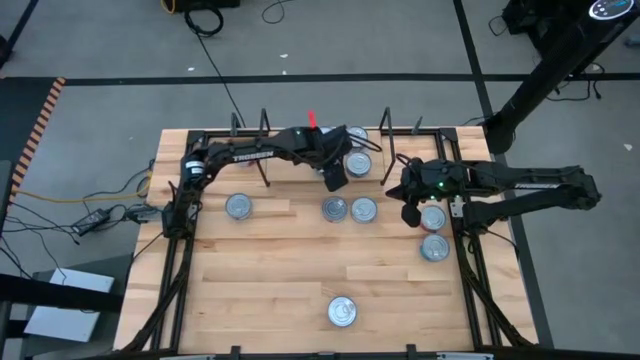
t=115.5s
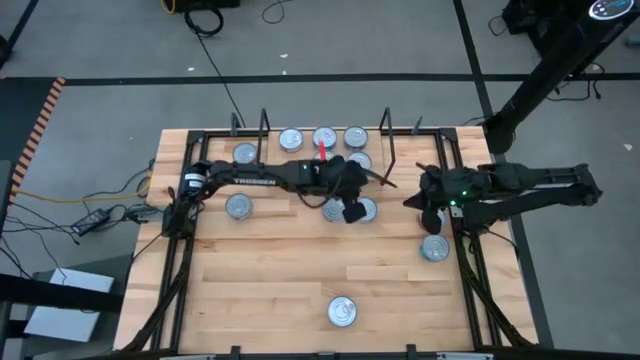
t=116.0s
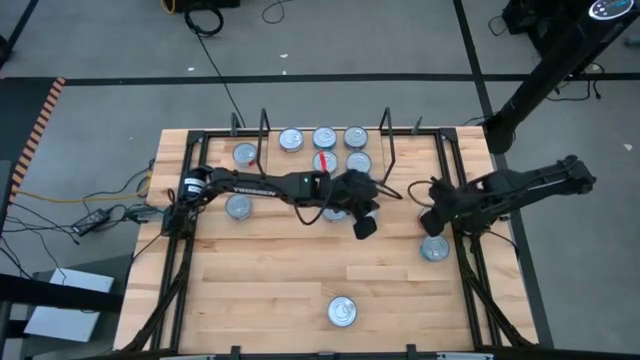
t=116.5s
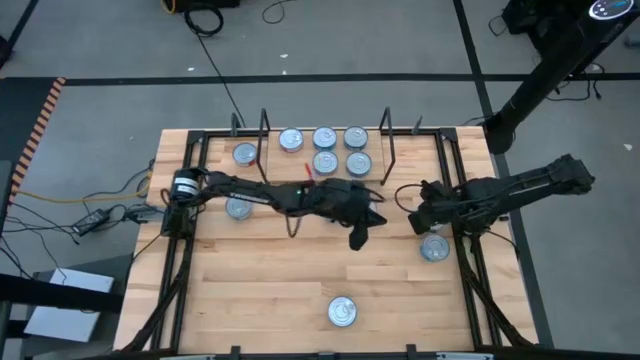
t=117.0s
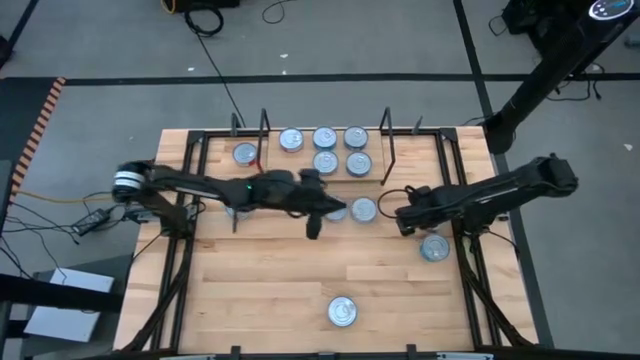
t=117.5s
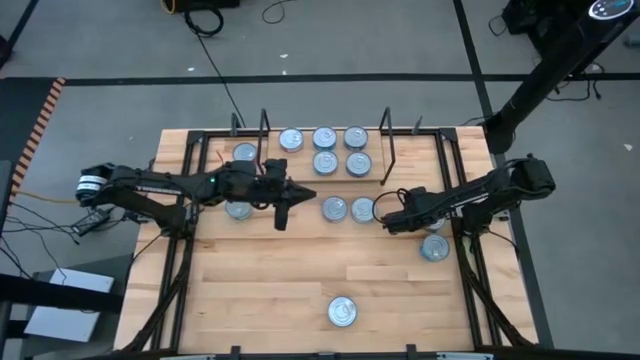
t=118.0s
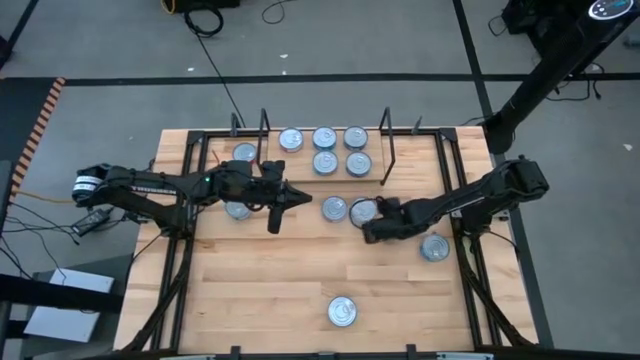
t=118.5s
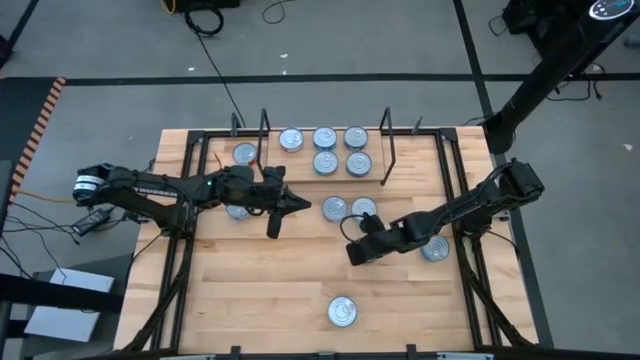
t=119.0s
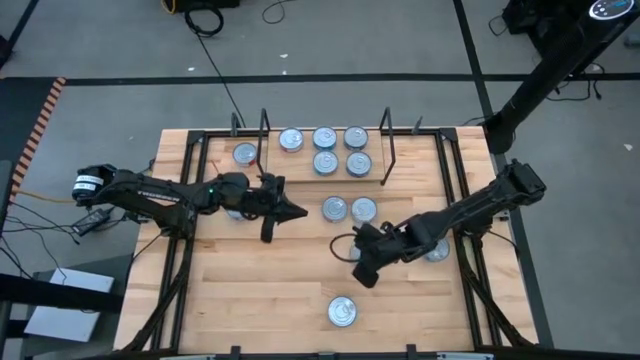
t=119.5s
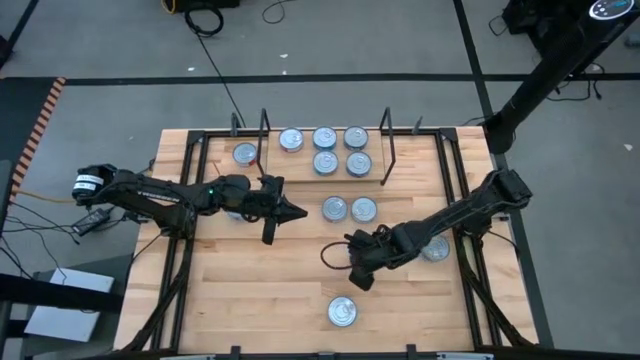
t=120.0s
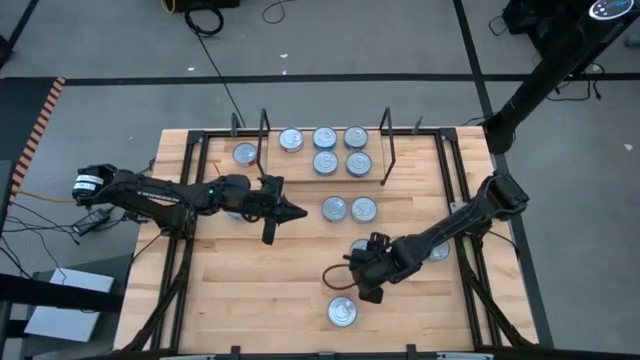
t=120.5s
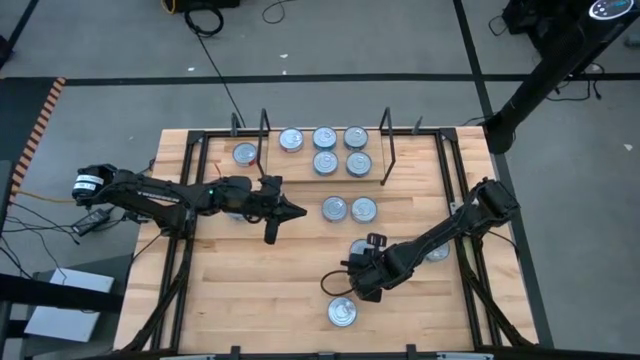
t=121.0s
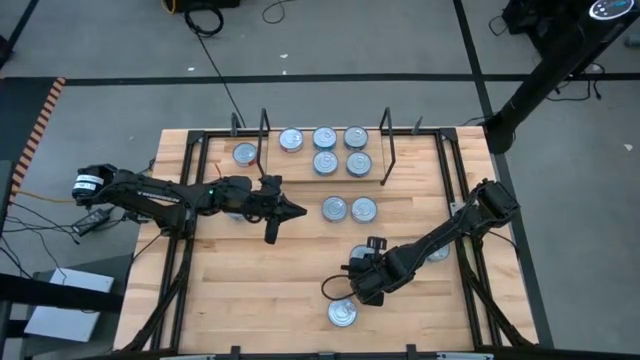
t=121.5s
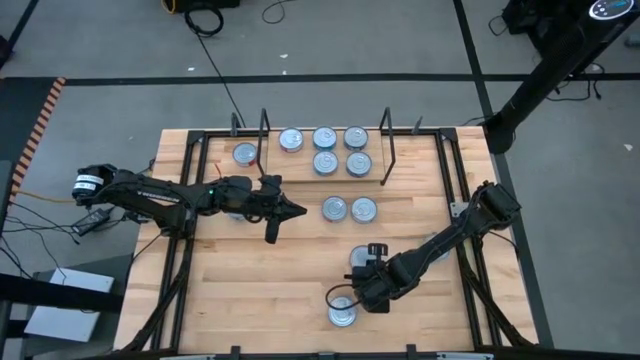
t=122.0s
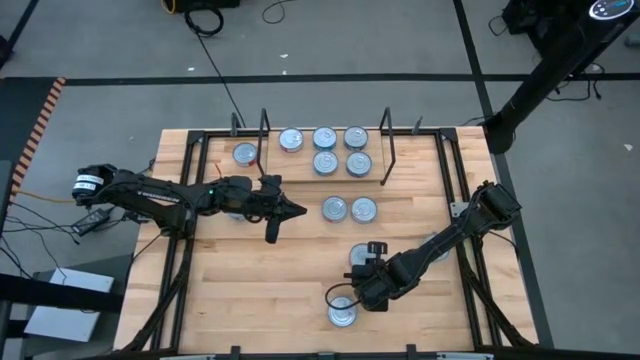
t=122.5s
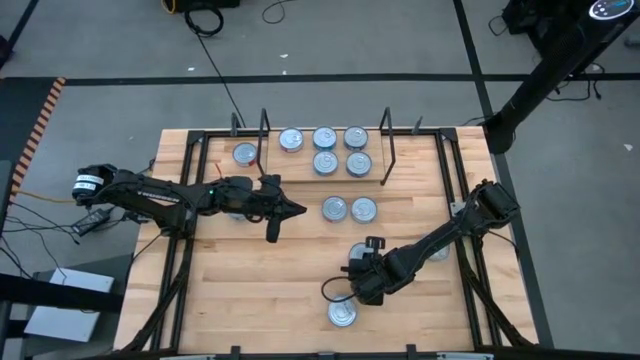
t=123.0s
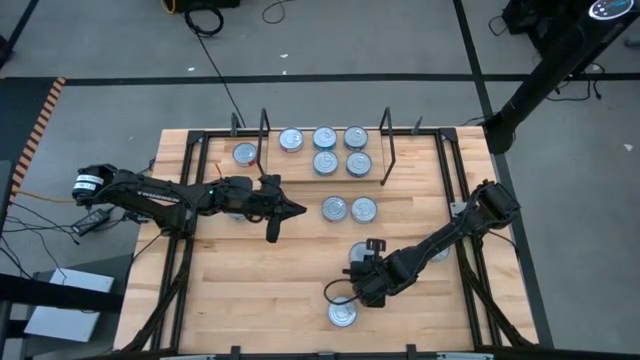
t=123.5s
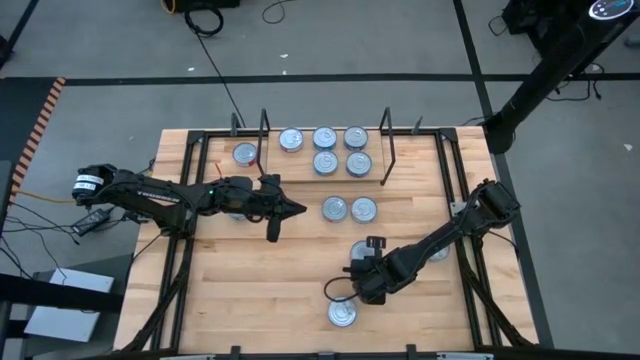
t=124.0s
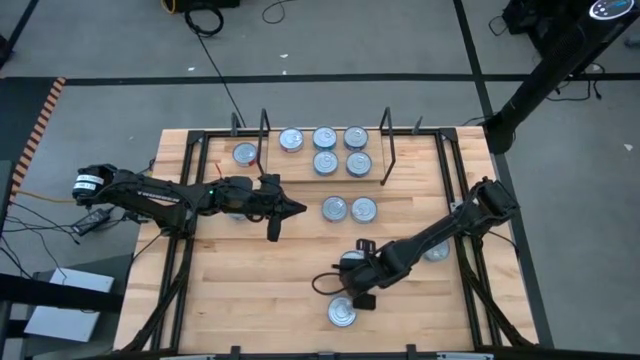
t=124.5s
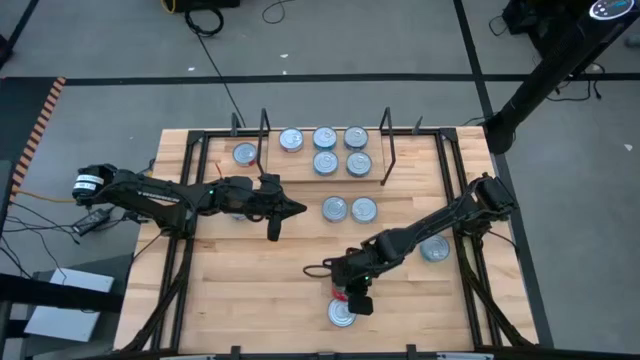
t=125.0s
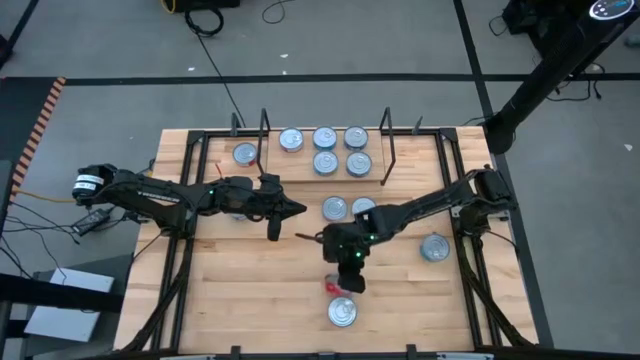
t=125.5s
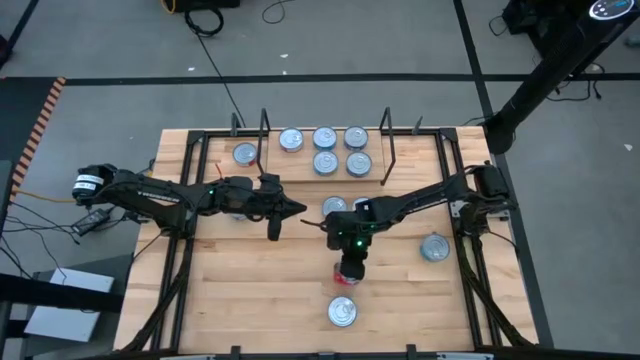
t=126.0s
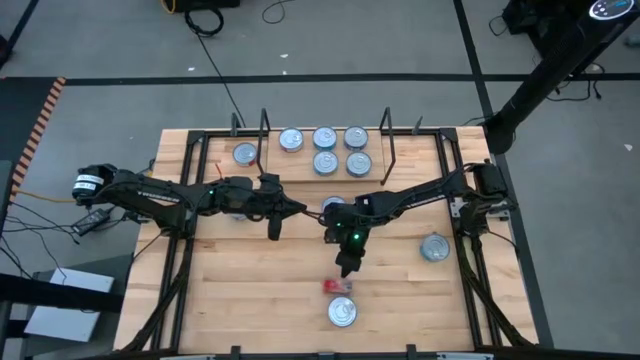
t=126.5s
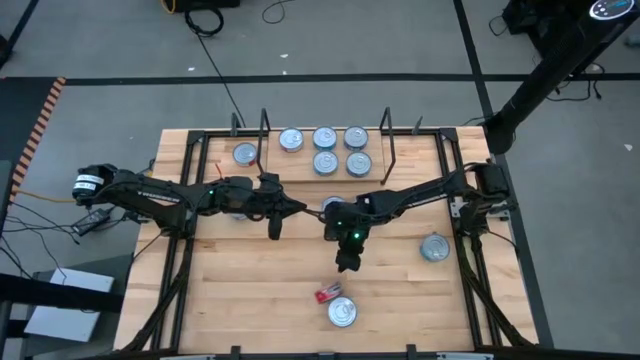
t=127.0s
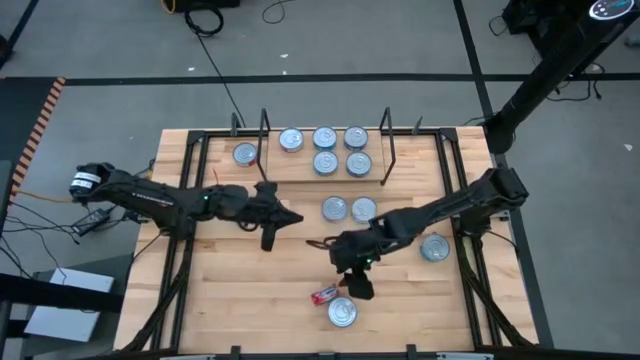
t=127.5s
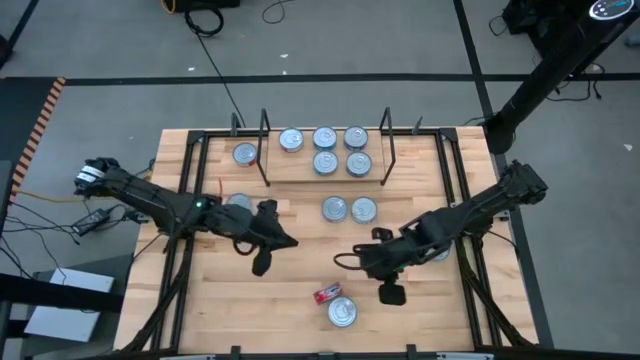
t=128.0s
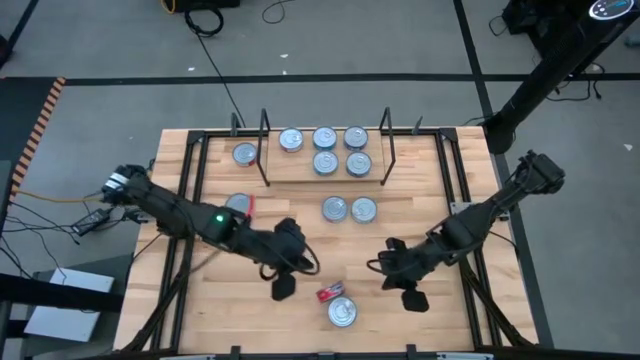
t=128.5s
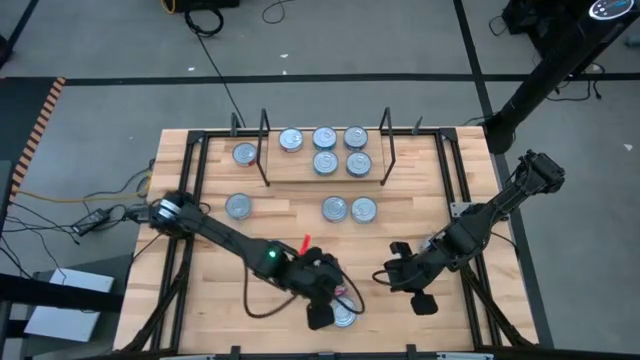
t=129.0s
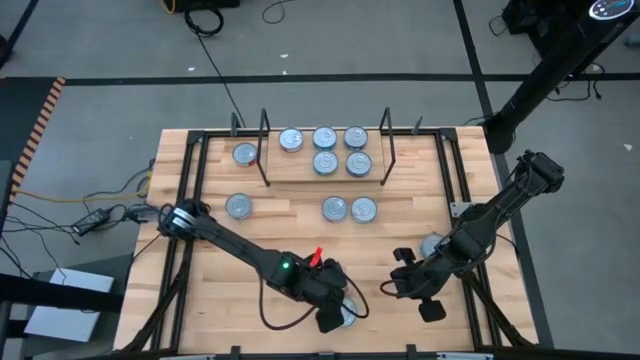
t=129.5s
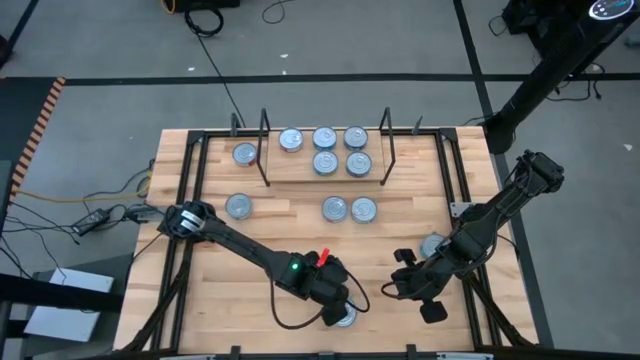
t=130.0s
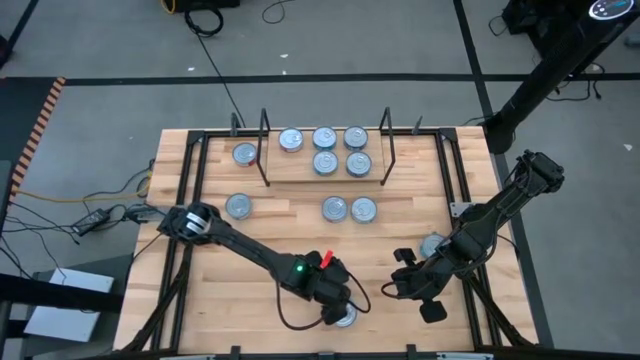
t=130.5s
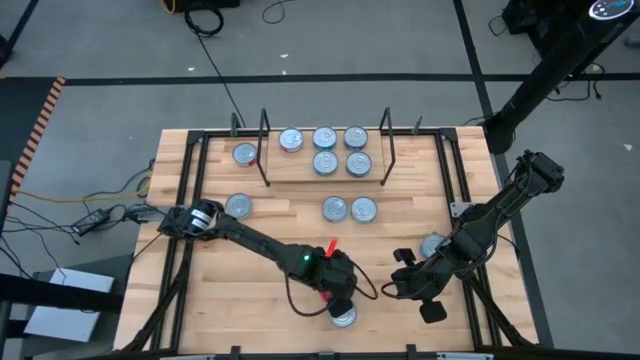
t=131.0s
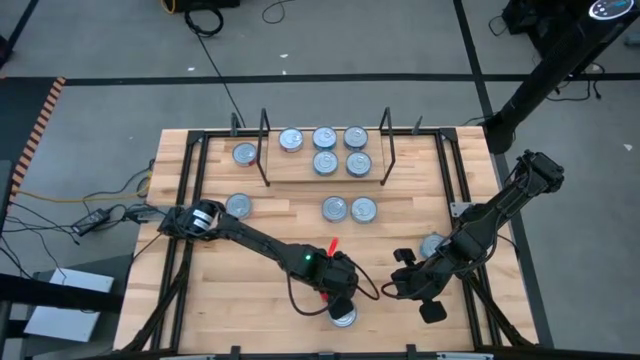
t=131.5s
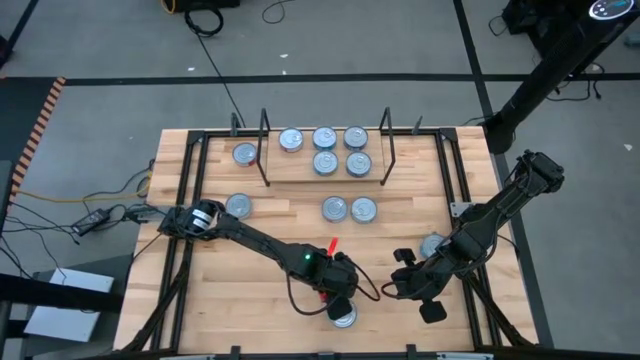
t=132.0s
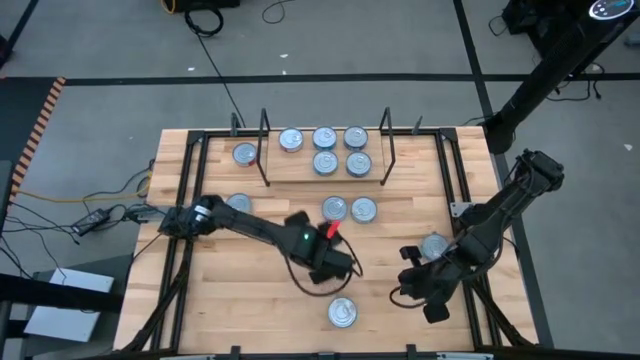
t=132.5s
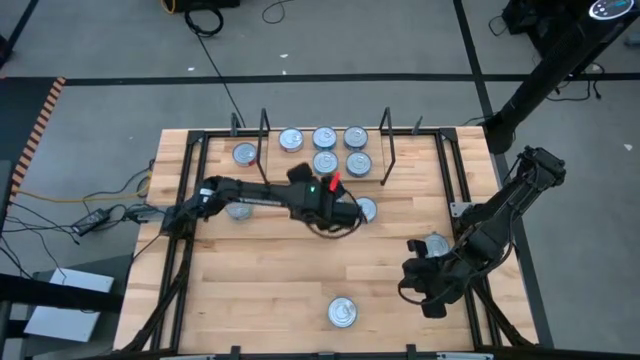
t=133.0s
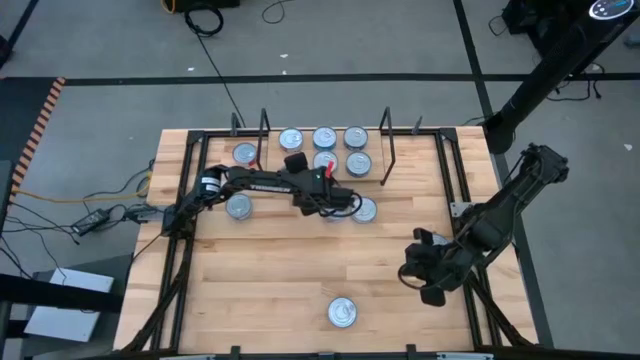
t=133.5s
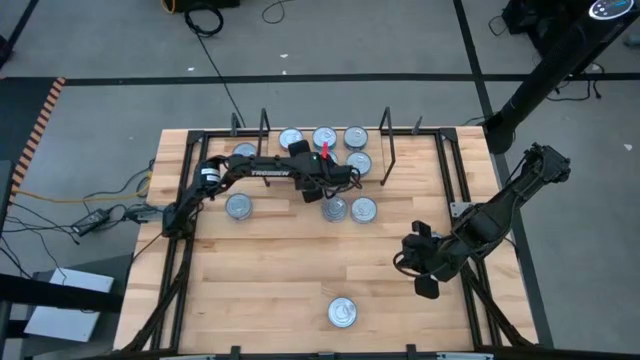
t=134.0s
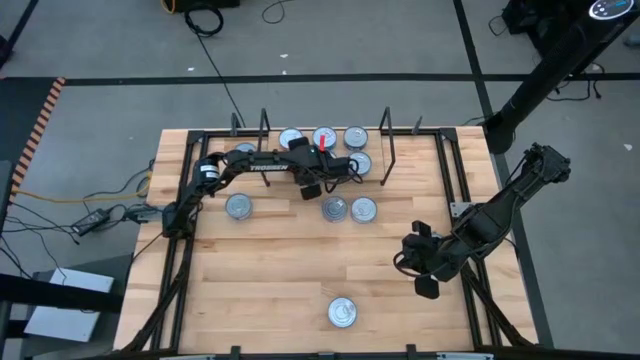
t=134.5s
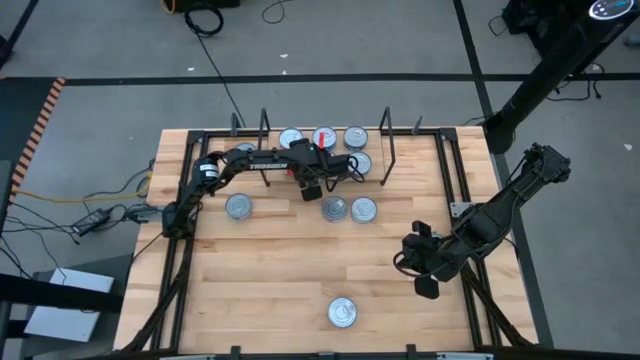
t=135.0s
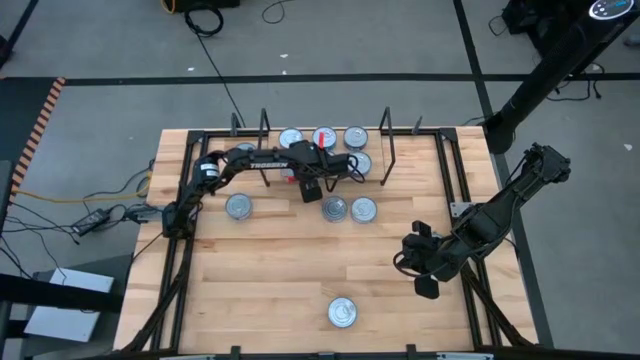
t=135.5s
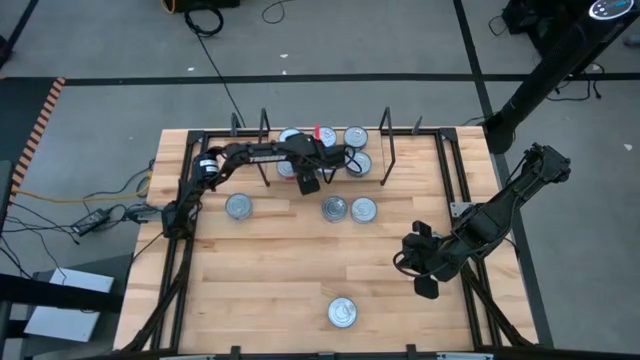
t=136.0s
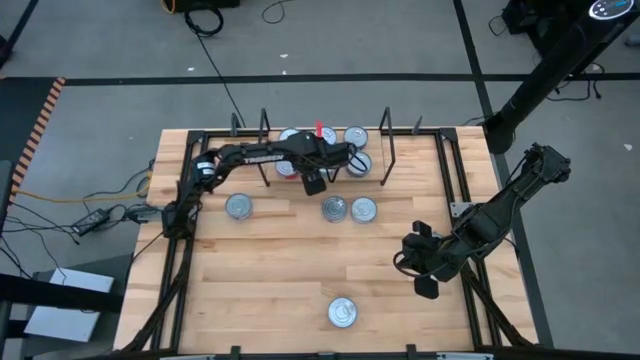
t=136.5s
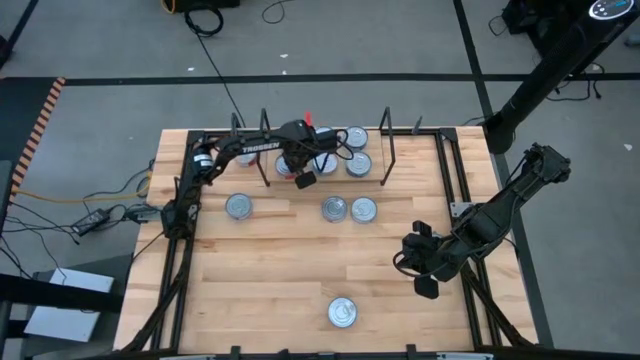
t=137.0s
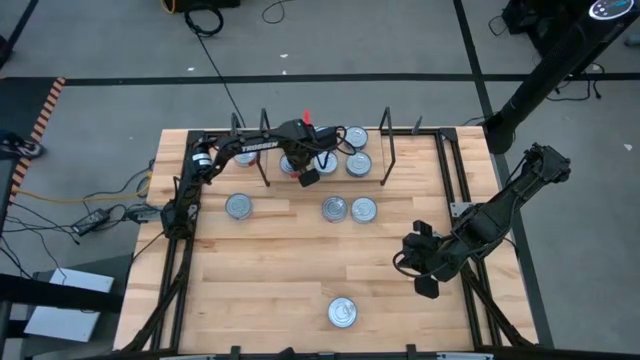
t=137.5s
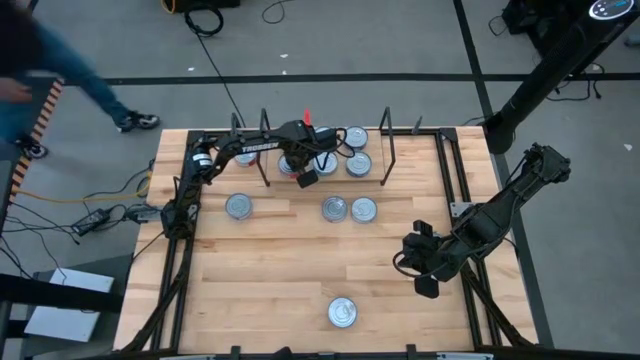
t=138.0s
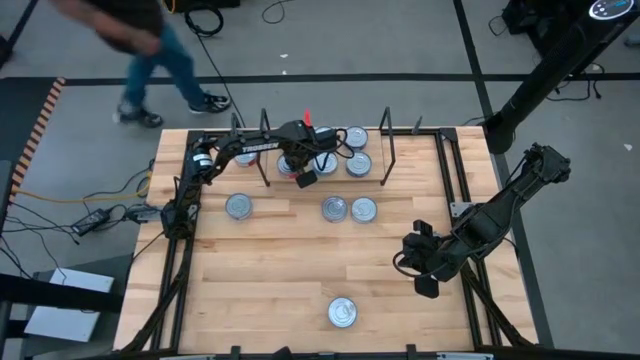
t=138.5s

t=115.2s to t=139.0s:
Task: Stack canned seafood by type on shelf
Put the red tuna can on the shelf
